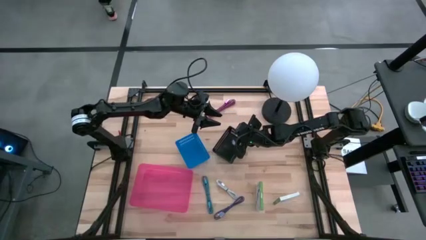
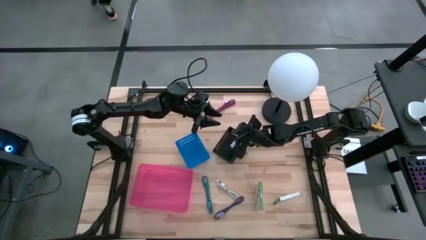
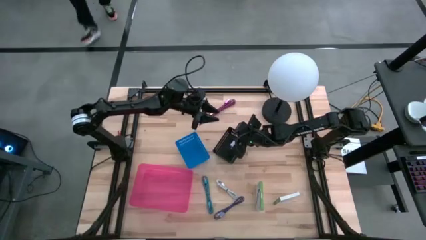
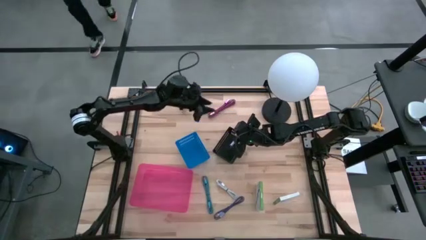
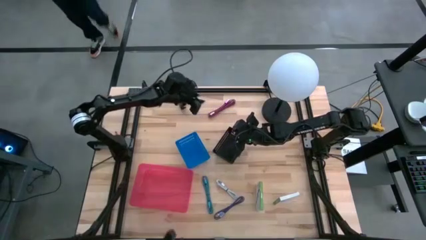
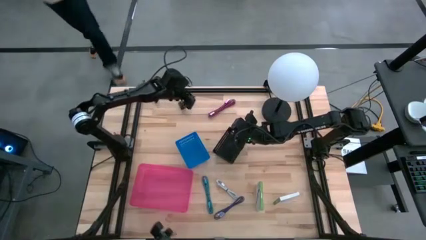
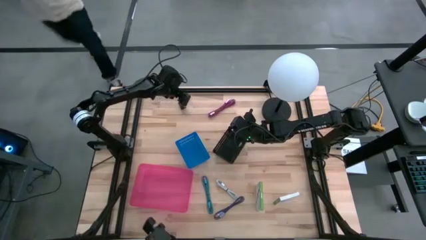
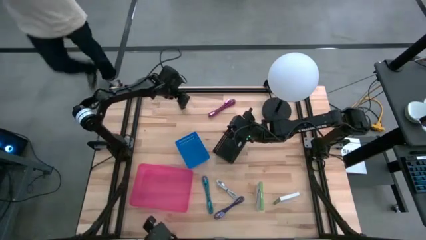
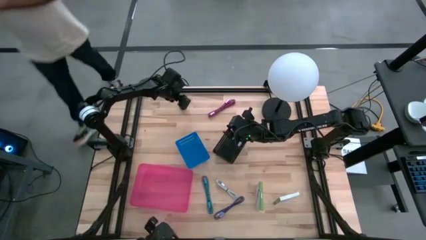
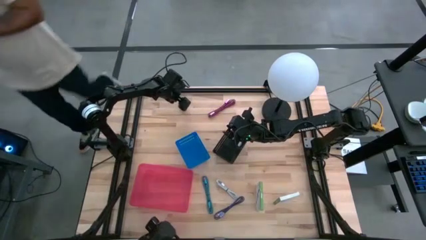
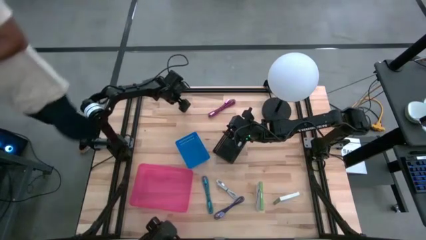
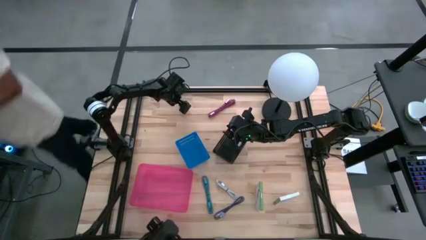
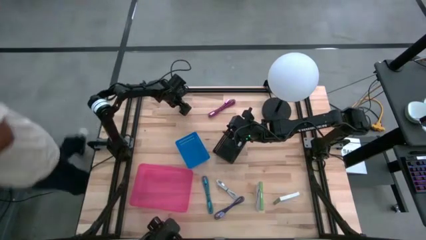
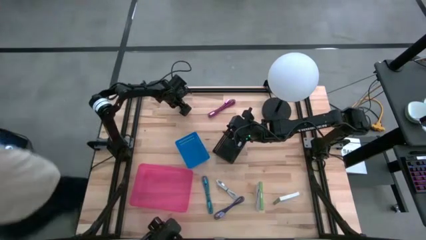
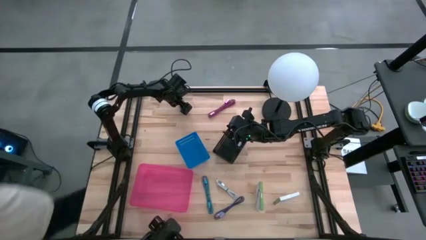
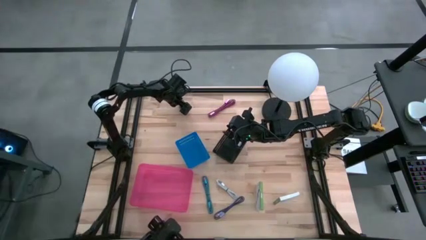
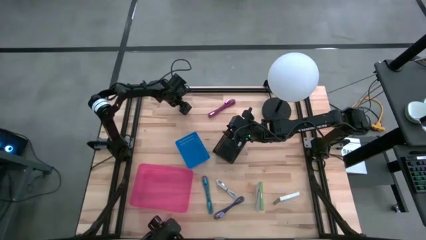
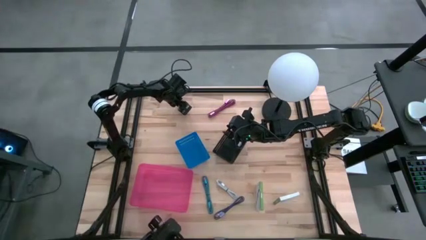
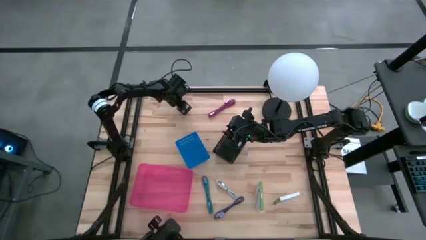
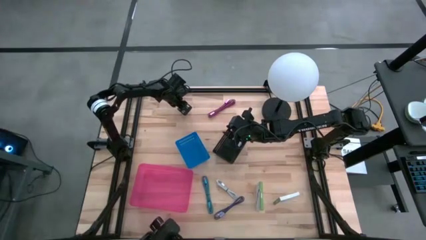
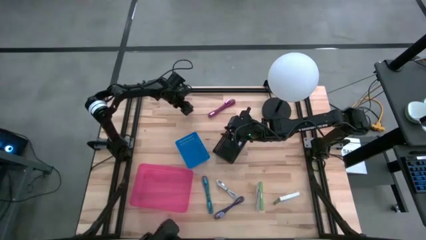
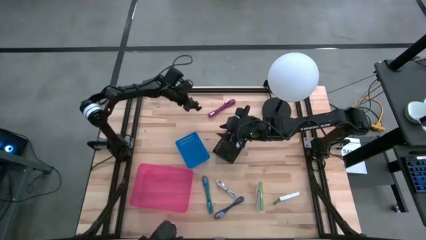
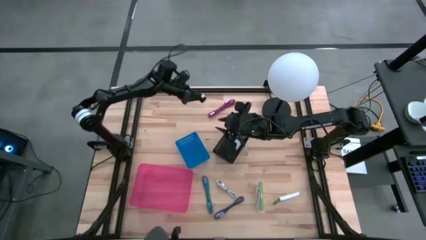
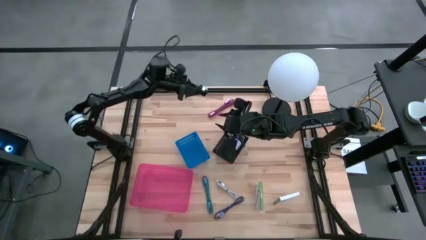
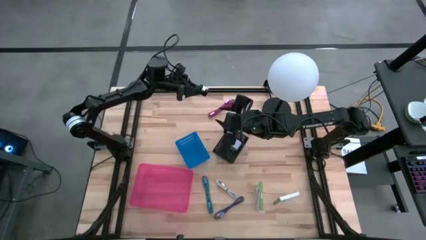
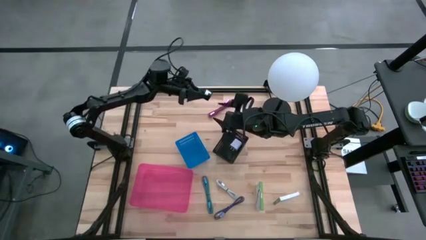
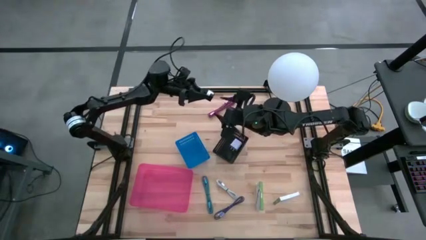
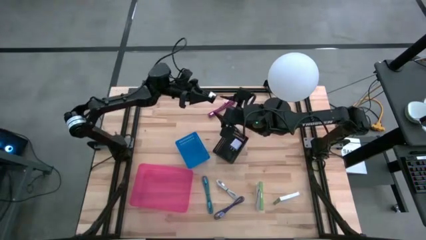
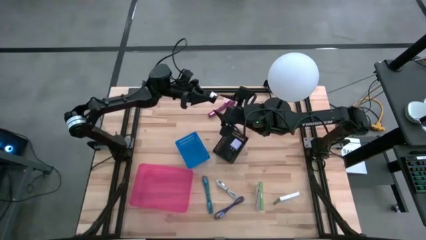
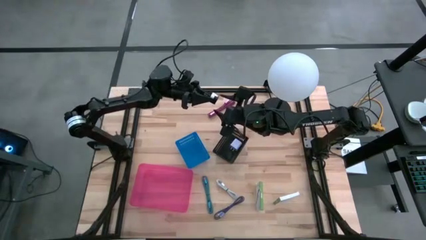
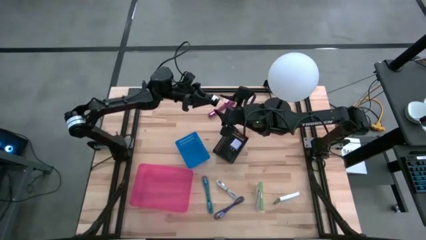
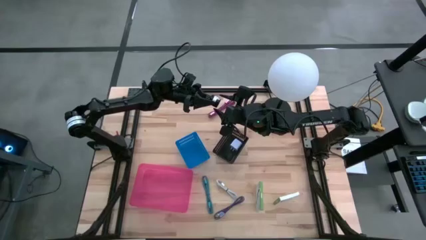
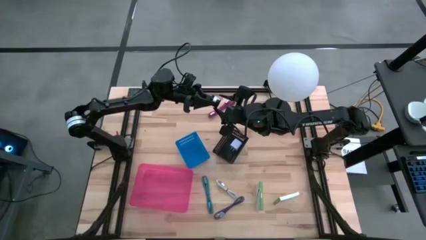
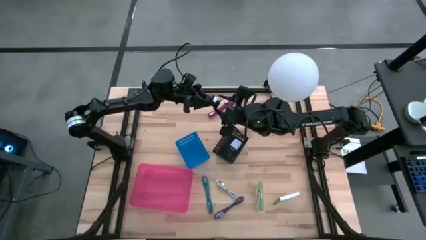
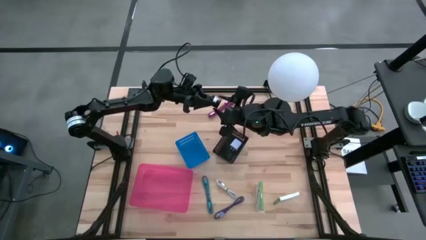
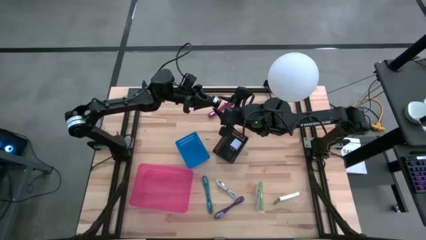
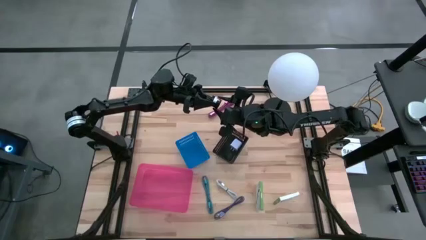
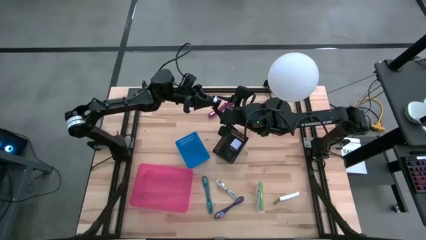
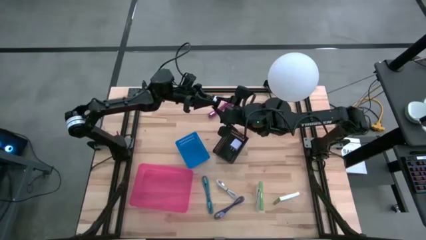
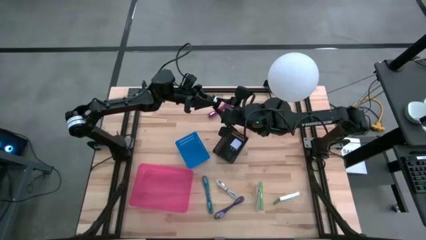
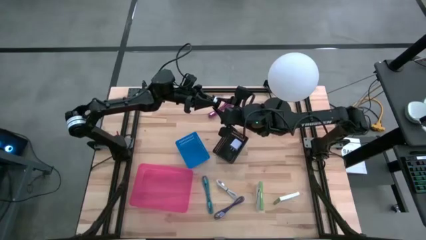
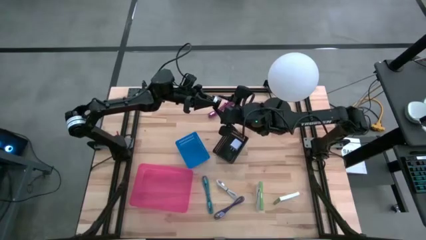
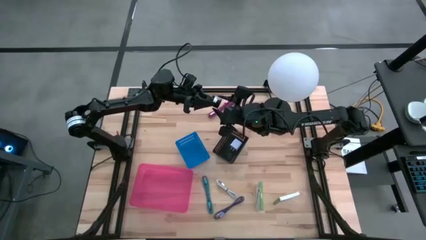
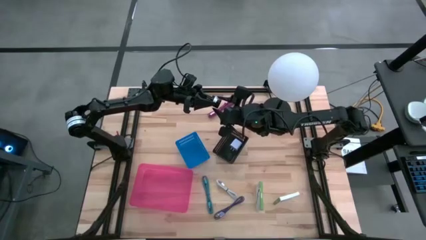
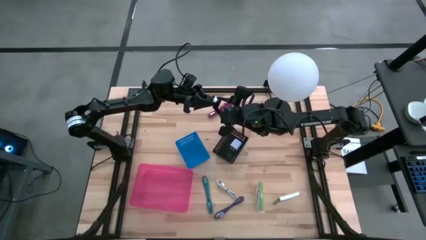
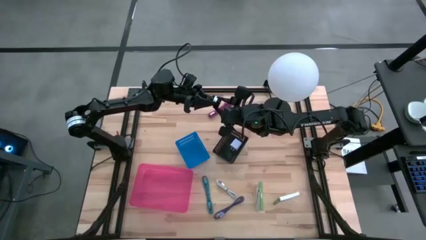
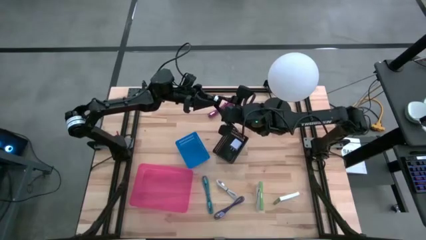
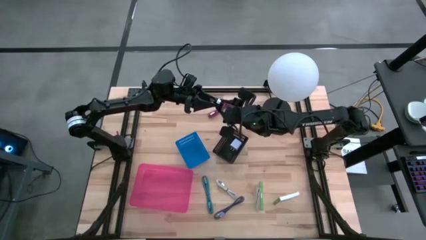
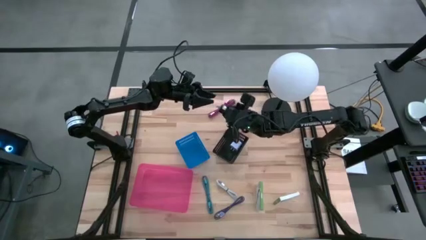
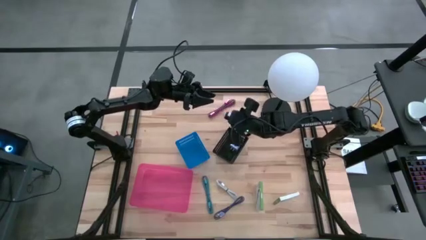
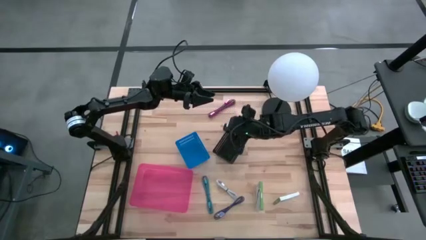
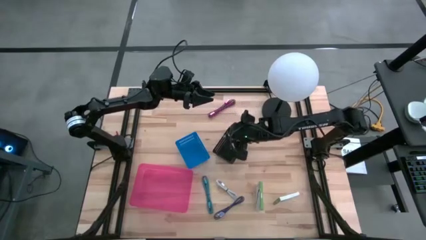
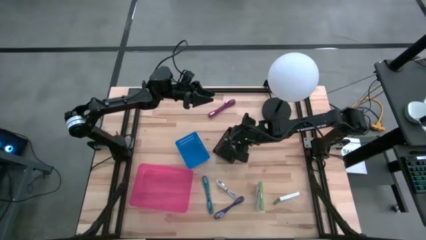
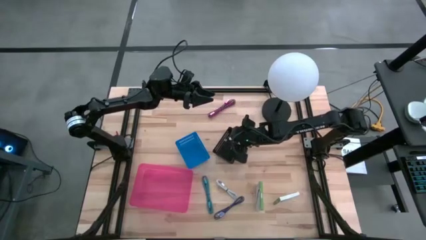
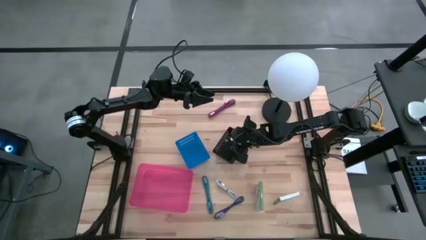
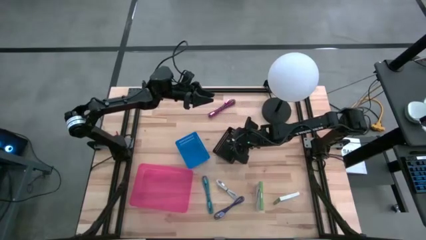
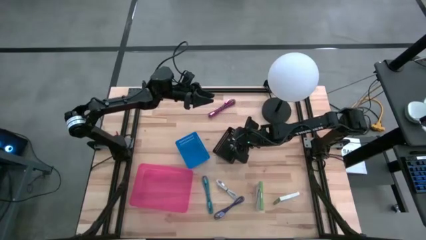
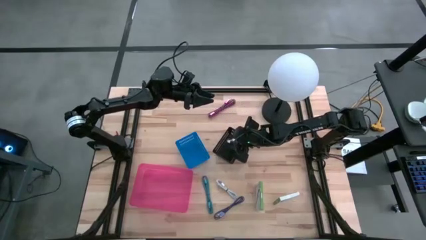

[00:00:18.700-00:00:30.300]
Task: Pick and place items into bin
Put the black charger adapter into the black bin
